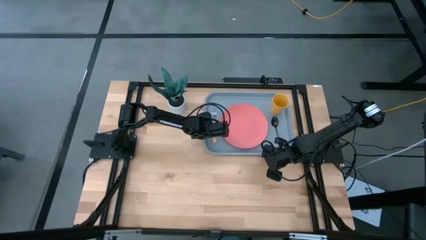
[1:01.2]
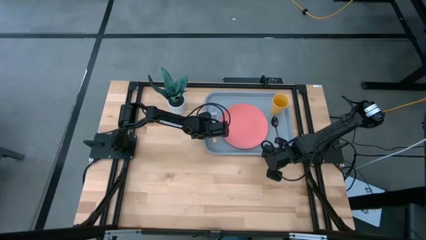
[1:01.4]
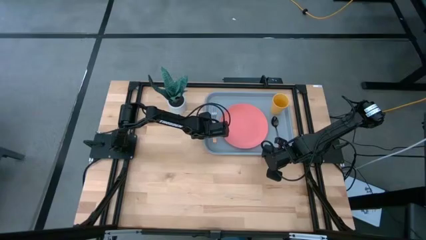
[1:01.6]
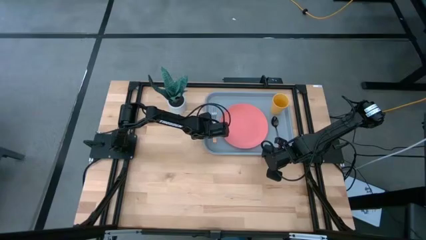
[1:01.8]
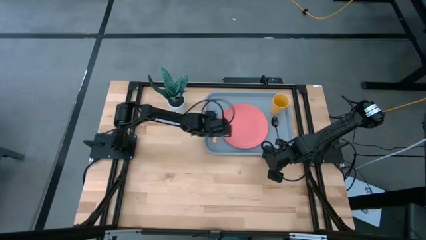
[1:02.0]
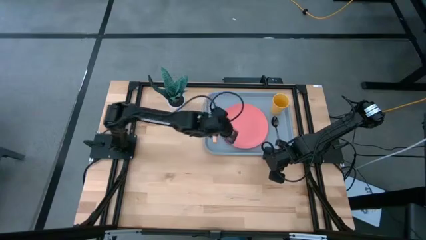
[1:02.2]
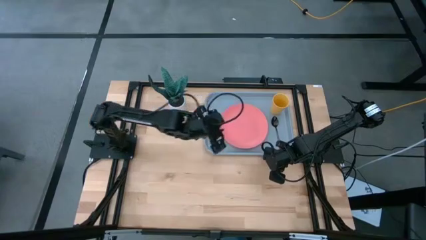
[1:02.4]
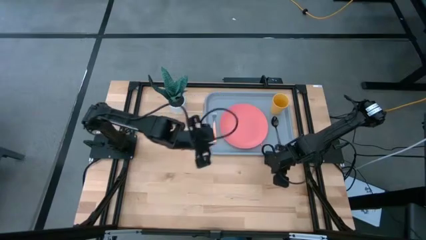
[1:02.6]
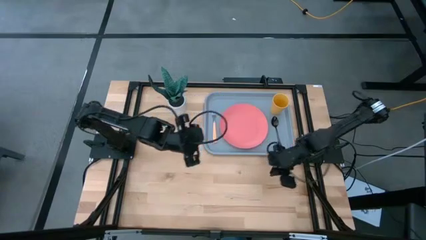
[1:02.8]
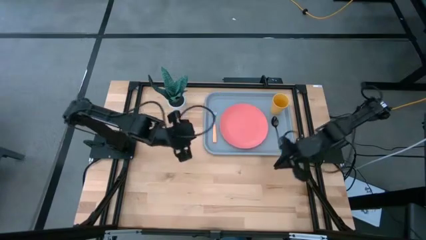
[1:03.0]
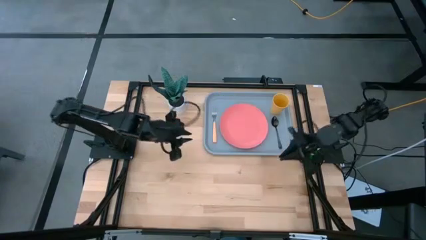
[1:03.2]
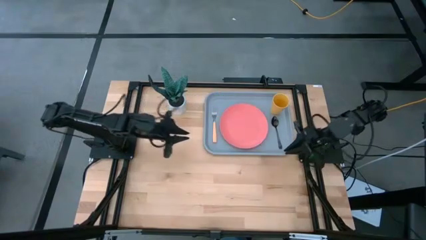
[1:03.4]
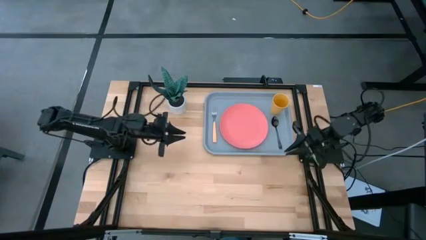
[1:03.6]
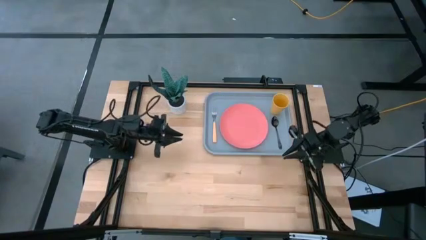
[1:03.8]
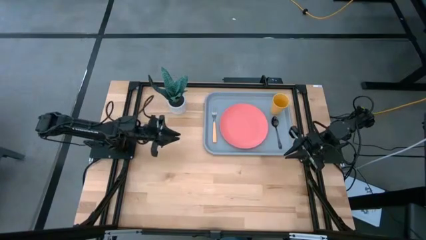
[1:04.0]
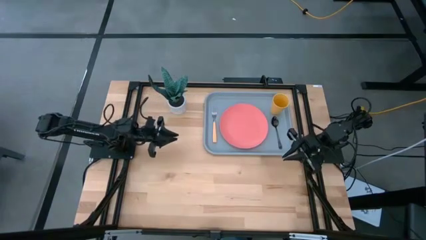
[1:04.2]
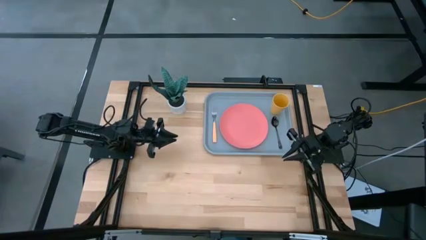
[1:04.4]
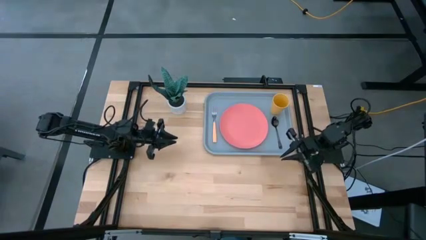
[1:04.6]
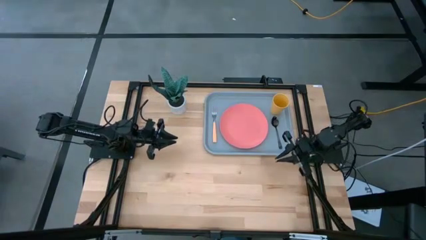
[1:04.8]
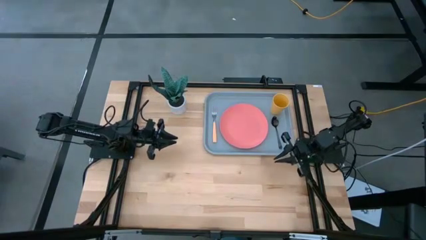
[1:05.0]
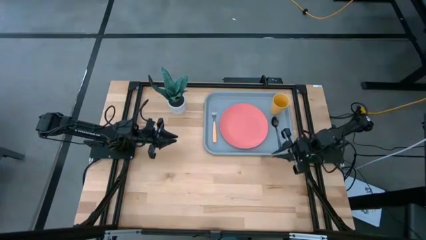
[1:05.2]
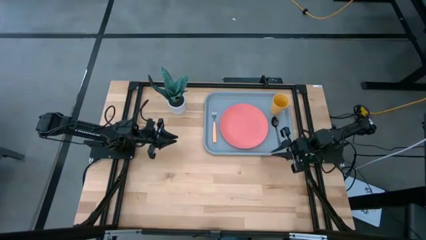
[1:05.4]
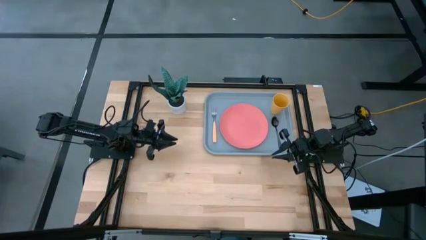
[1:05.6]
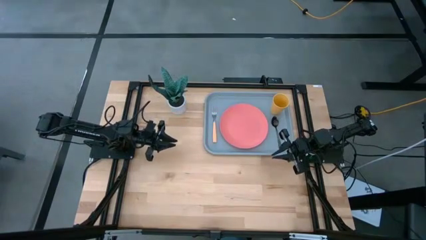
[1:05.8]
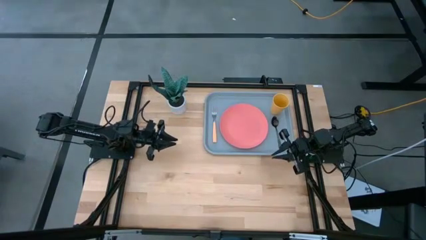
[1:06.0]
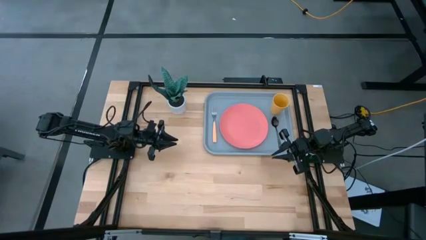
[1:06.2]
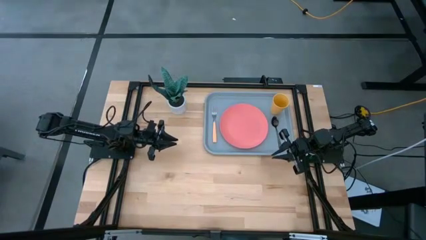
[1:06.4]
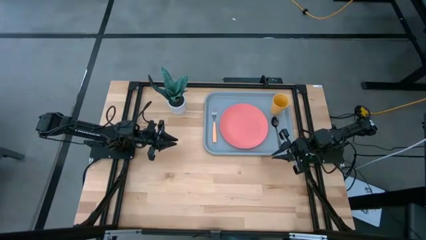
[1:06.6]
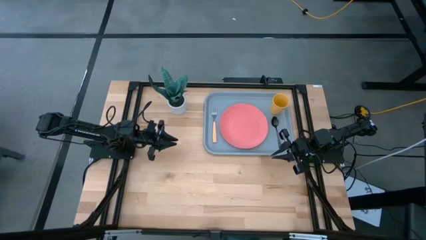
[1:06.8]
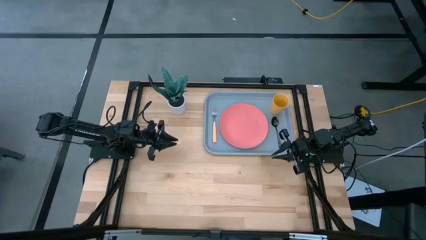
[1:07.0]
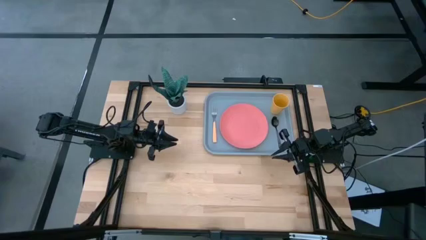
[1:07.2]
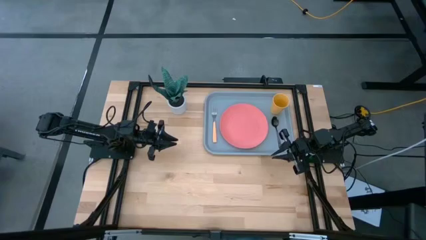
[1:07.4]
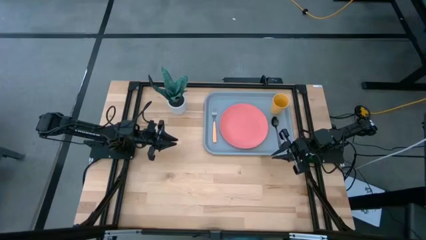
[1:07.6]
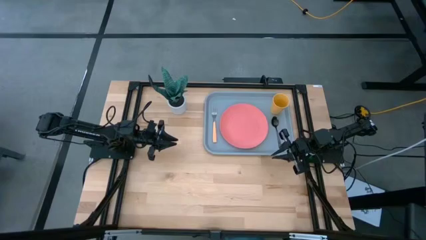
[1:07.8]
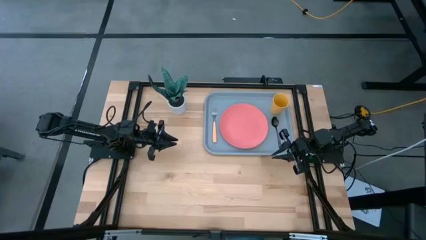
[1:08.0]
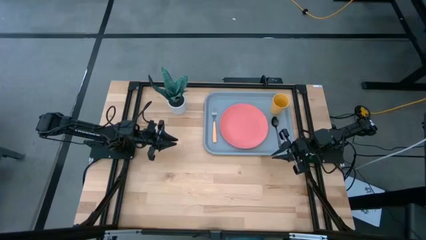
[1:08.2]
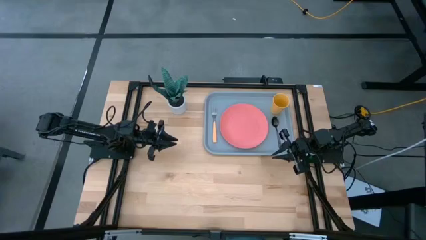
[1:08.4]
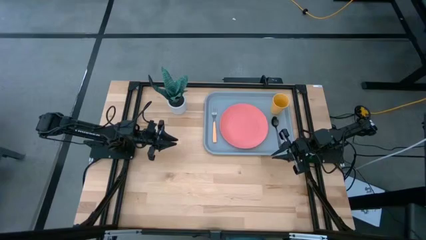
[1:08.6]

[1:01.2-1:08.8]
Task: Pick and place plate/cup/fork/spoon on tray
Return to Home Position

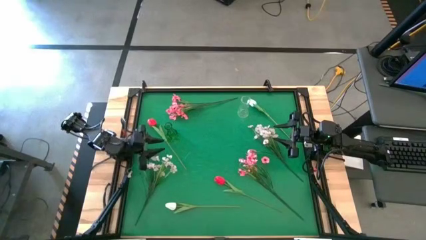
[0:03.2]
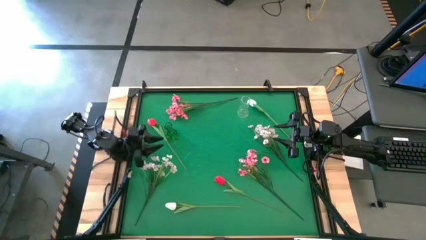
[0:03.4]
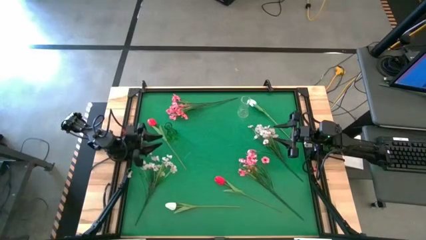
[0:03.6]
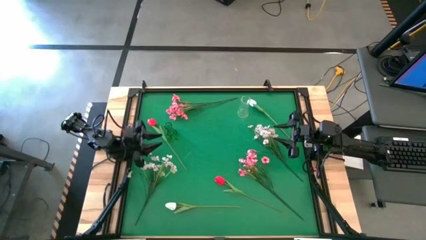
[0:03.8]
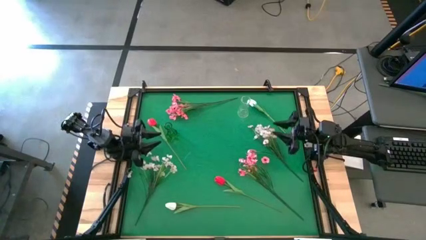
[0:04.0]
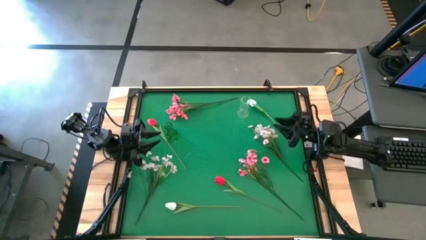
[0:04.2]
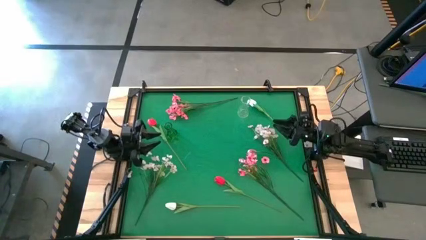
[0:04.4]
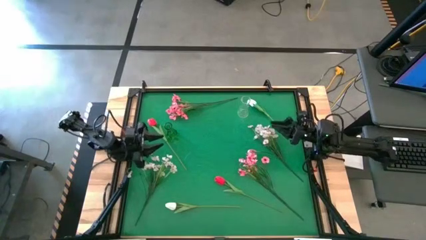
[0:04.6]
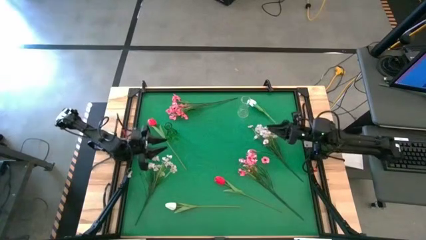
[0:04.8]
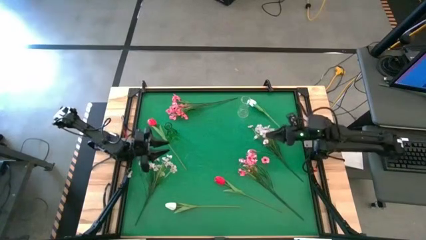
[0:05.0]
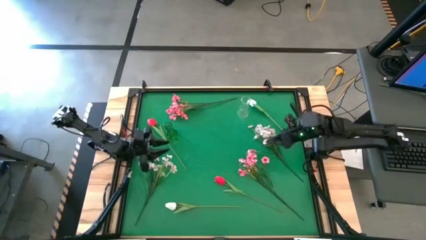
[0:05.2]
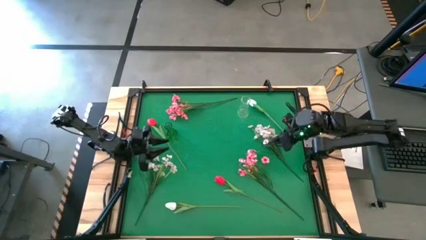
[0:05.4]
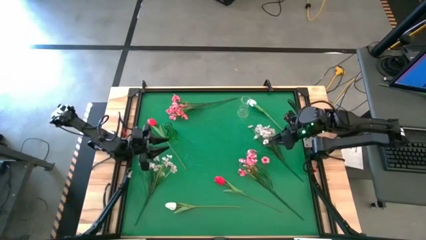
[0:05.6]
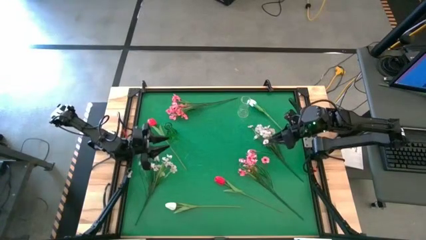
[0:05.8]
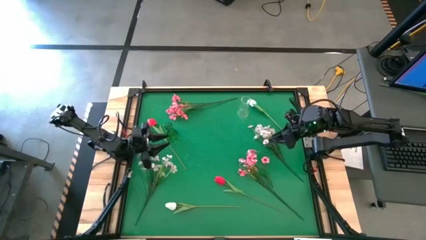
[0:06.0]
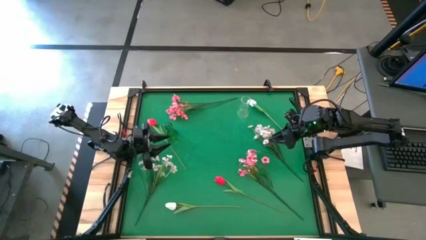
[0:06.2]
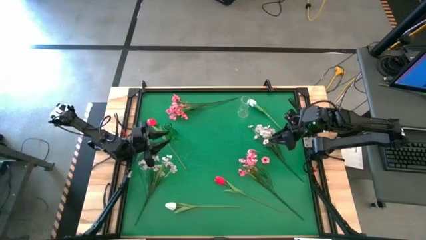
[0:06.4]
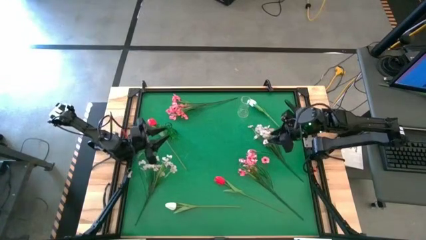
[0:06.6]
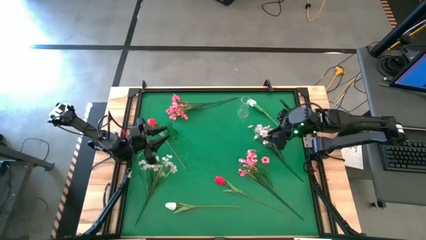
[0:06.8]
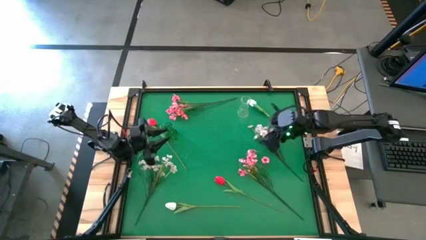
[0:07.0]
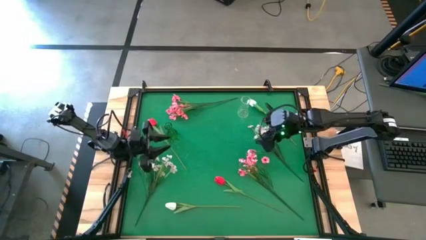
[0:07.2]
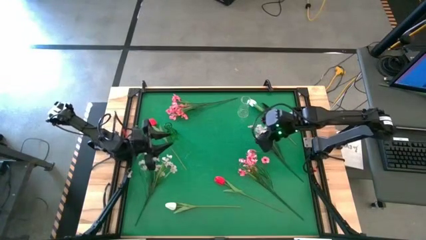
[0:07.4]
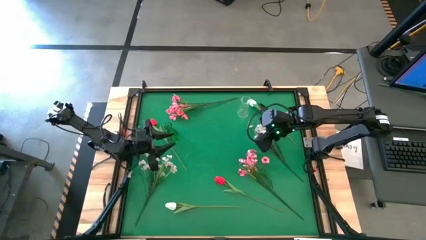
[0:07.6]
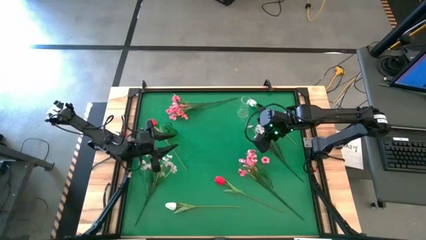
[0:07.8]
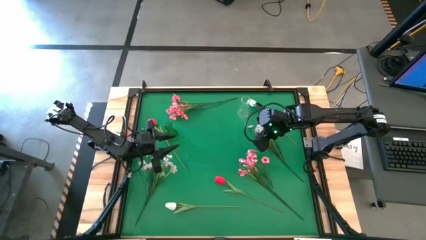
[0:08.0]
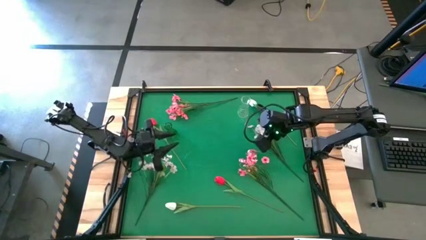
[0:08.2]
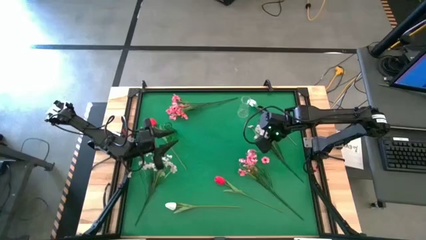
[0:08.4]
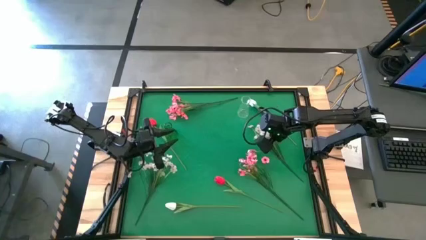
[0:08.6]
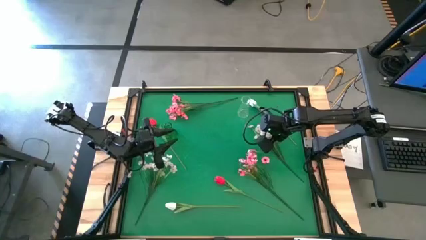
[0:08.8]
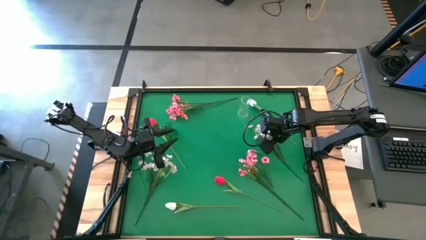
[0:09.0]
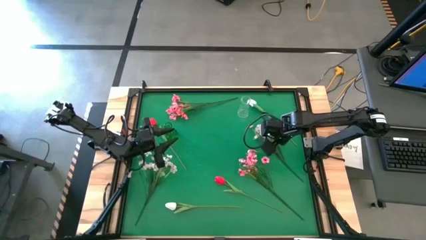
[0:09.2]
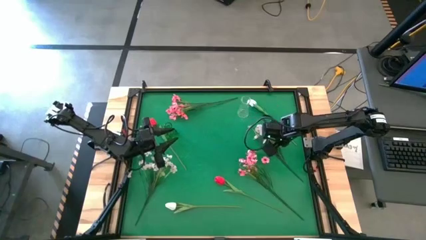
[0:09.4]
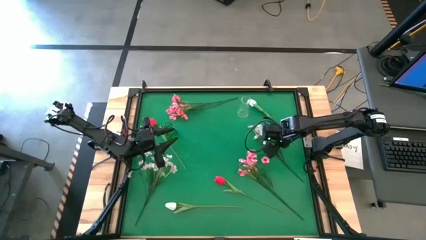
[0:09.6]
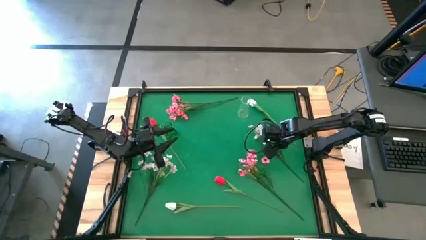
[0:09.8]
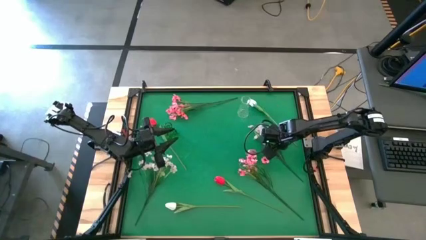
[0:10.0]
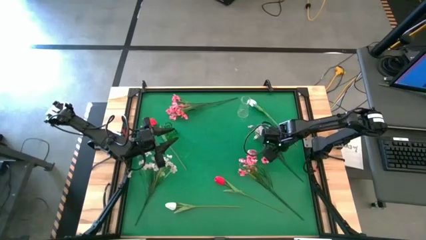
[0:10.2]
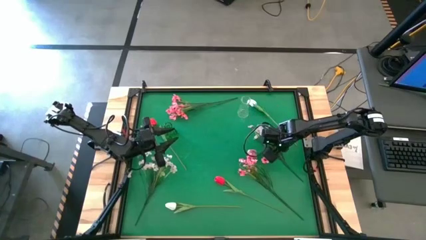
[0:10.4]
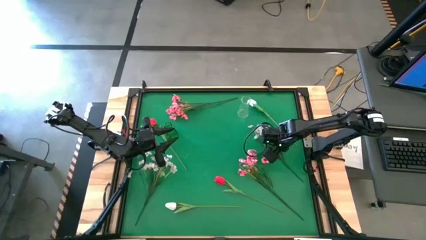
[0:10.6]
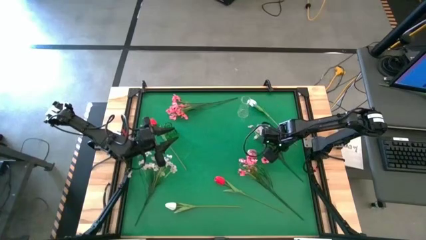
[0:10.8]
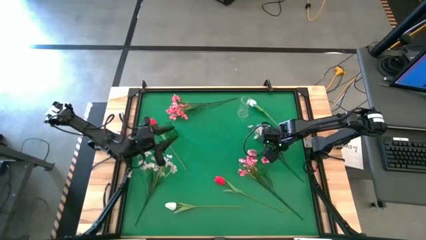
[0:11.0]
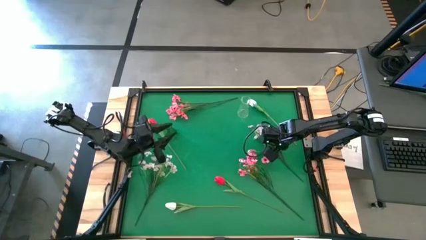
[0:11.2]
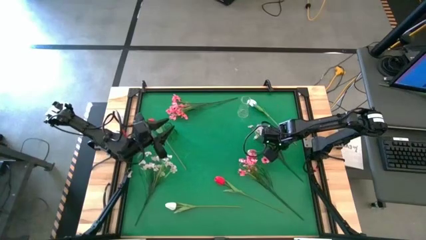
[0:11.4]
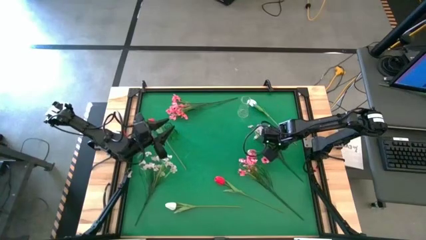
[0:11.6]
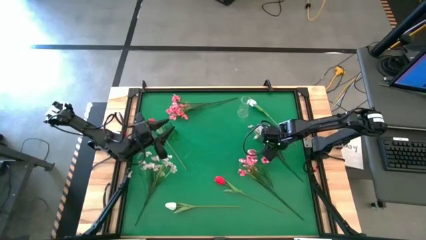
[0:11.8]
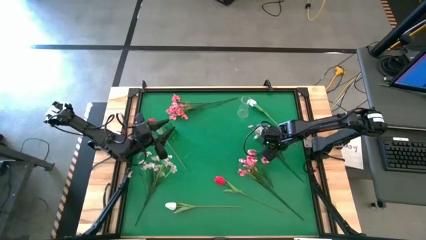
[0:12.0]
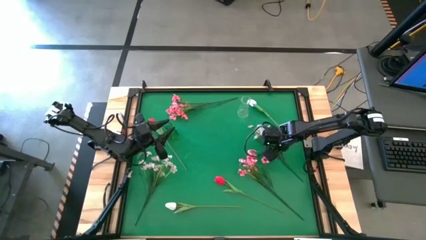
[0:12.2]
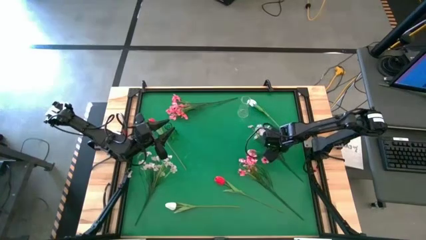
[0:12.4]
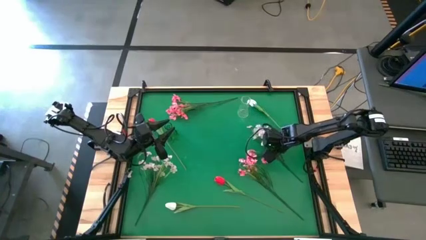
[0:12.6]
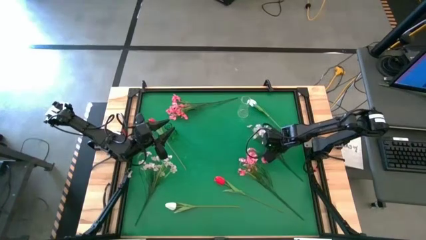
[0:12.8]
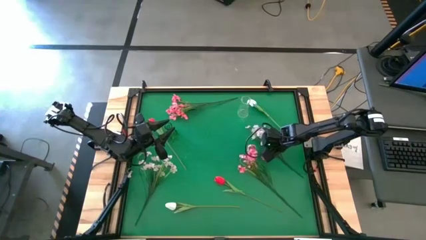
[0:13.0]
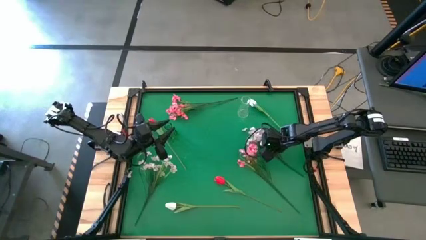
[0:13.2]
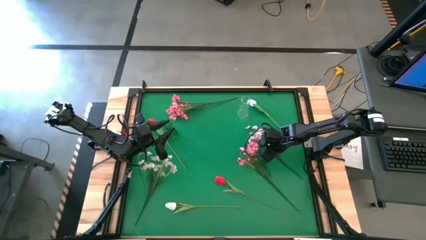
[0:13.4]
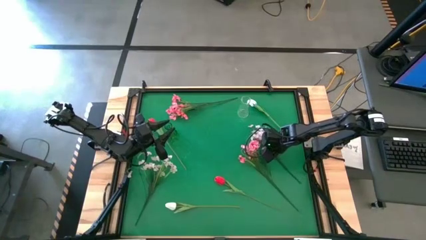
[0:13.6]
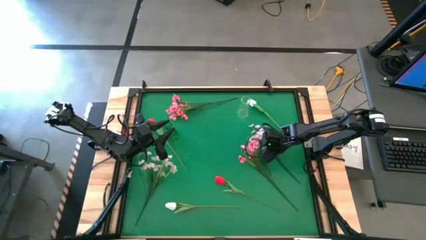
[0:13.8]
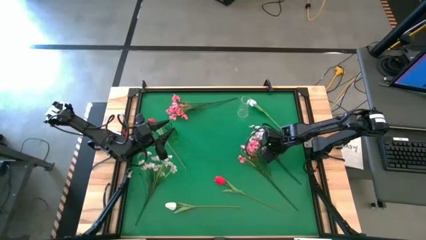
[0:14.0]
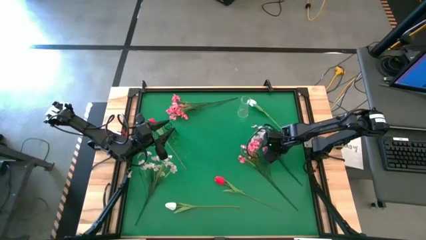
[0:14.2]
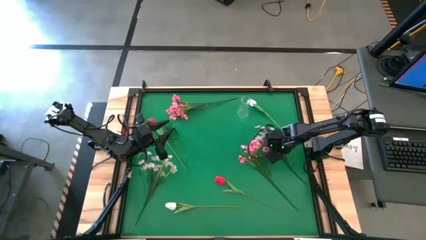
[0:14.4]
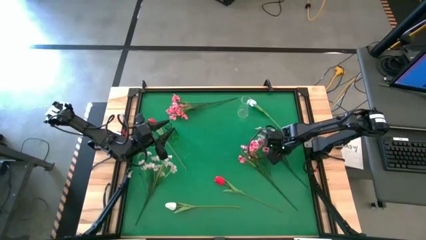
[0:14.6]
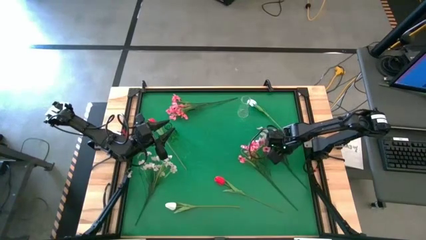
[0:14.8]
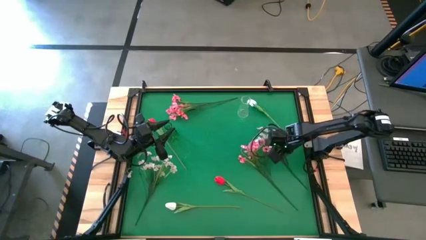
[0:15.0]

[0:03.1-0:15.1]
Task: Sort flowers into vase by color
Put the right white flowers into the transparent vase
